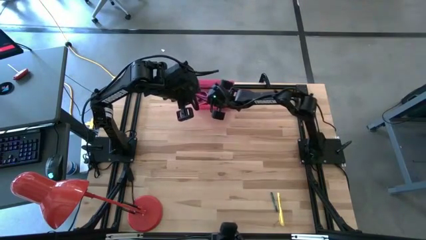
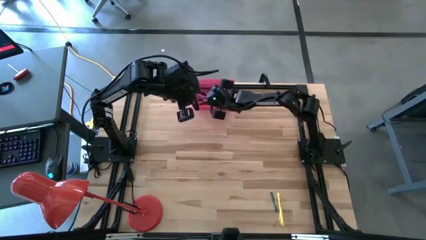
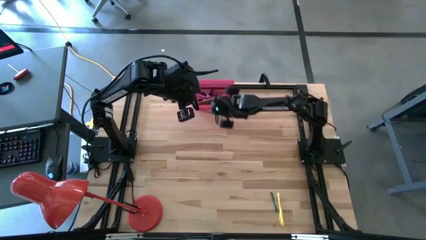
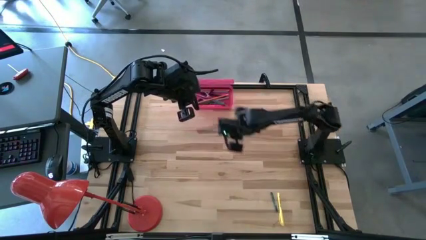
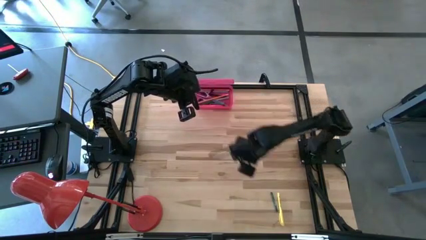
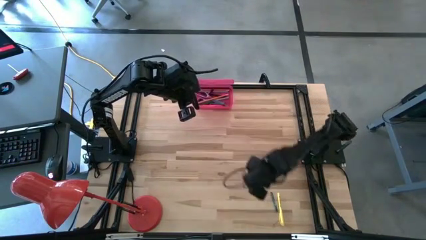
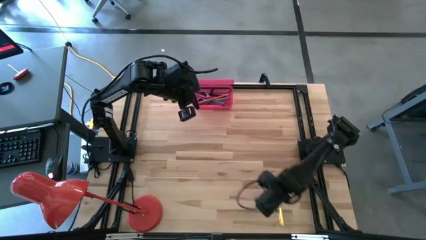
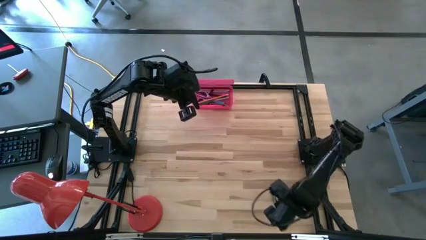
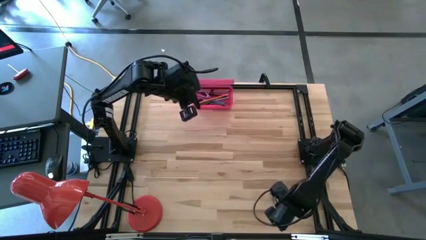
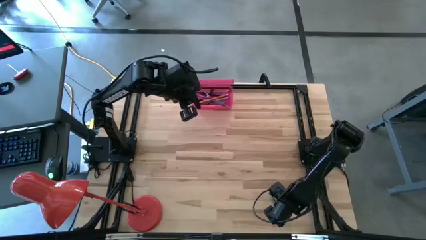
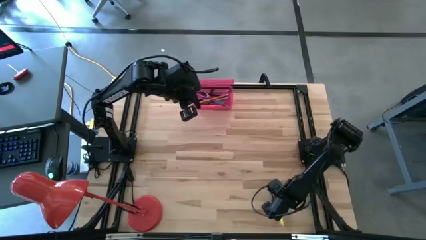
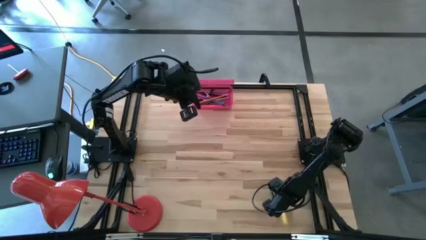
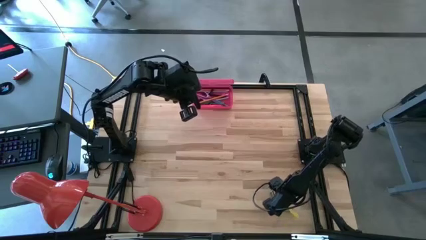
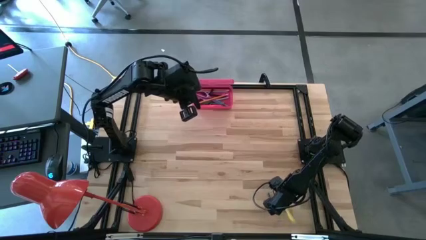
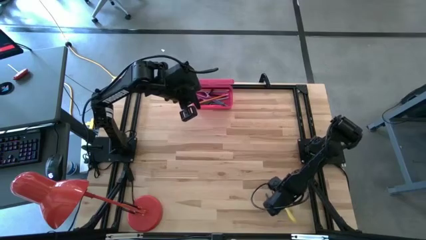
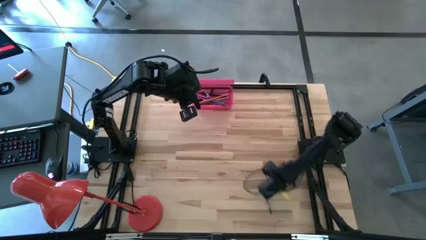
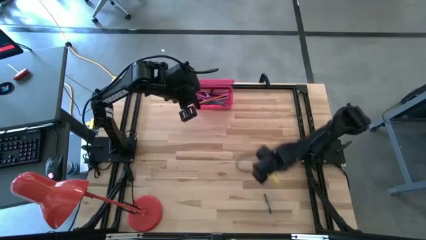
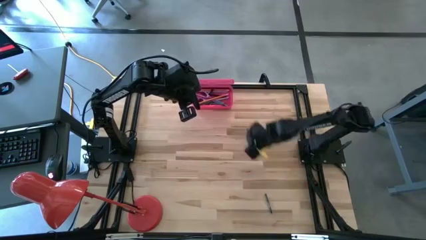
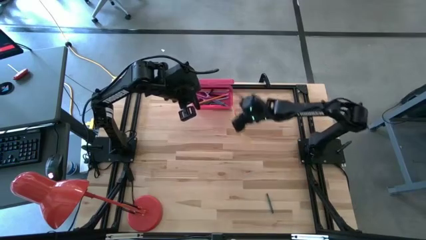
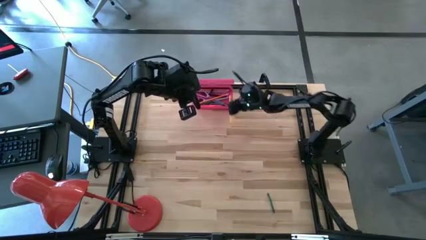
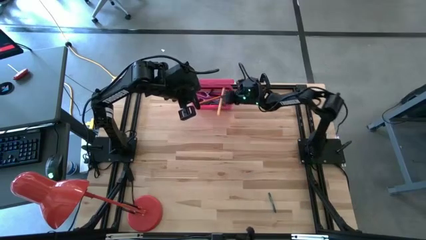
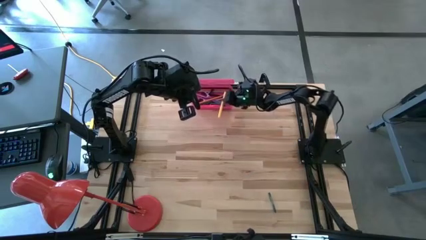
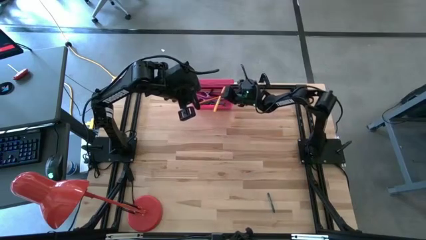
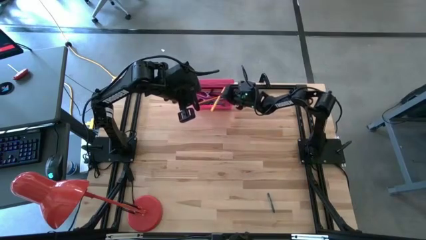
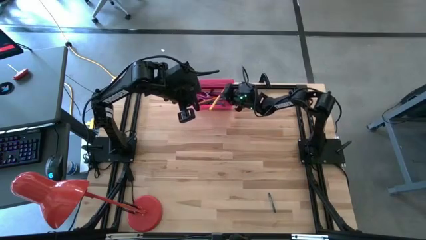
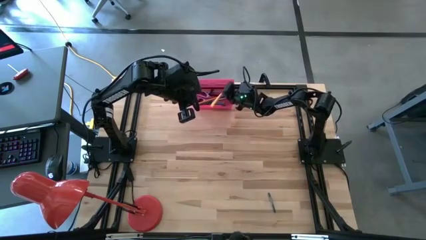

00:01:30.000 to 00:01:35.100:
Task: Pick & place school supplies into a supply box
Put the yellow pen into the pink supply box

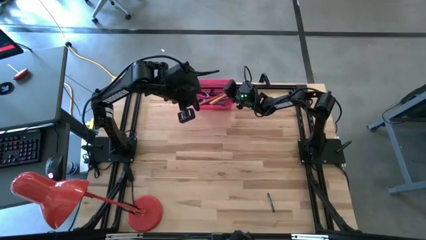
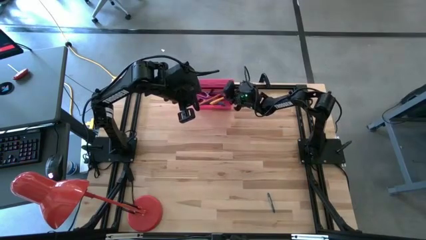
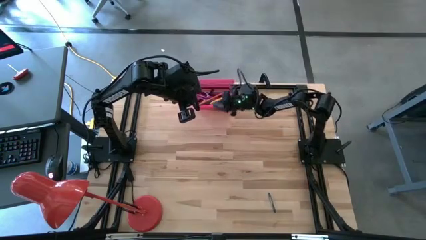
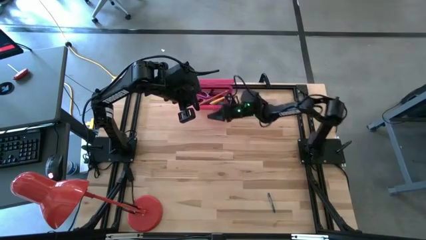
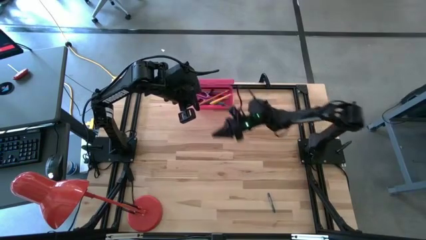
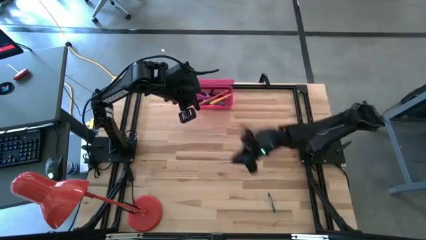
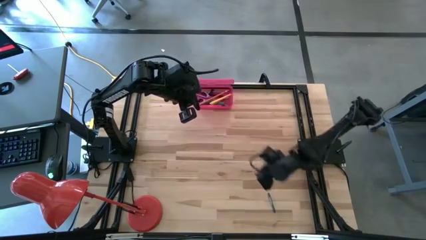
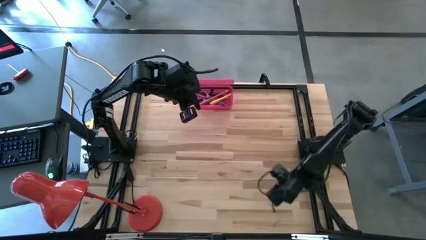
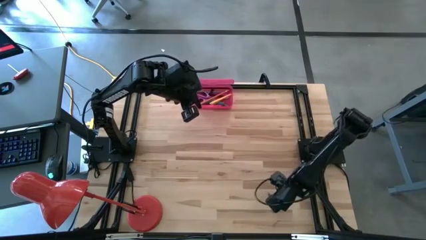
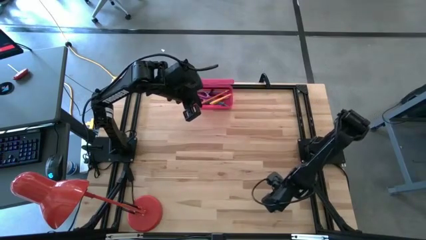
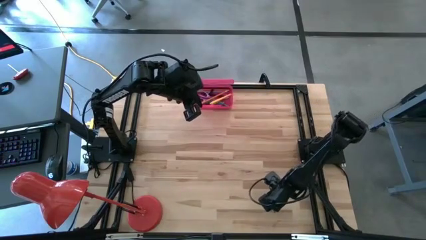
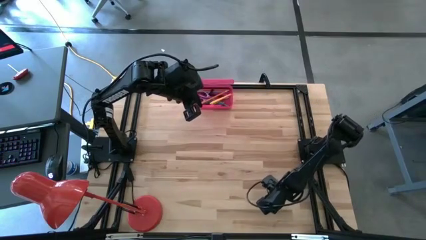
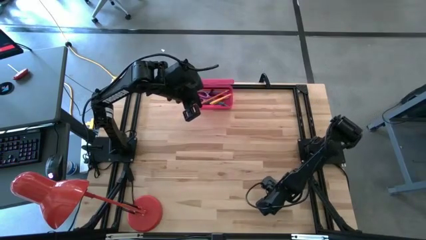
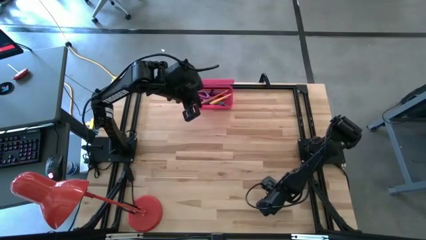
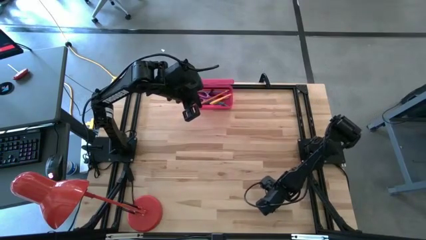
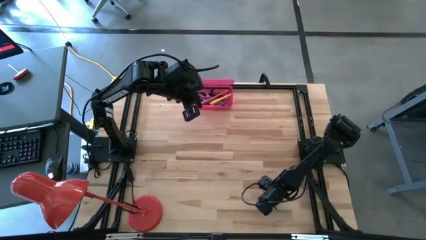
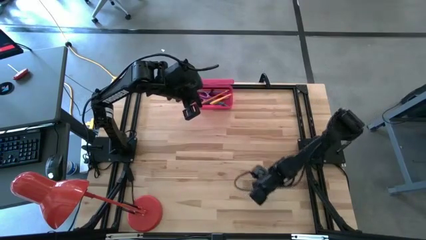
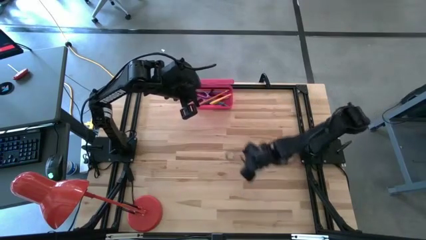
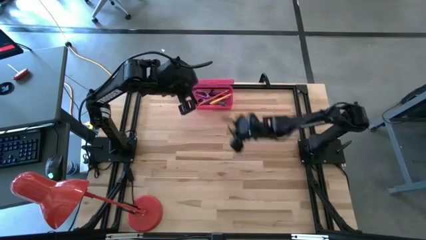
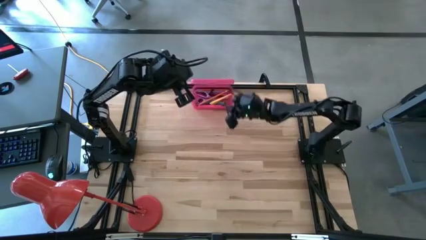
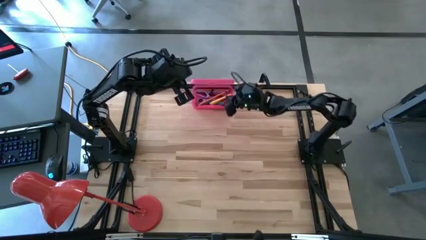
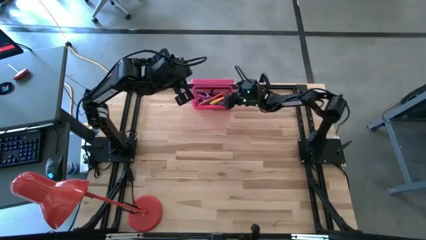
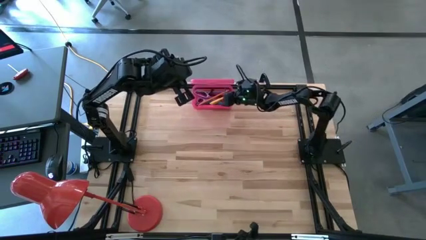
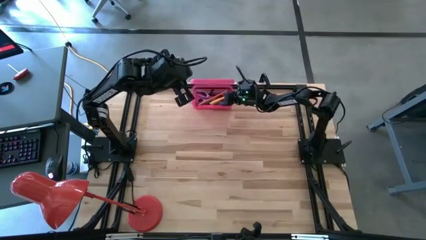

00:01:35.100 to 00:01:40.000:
Put the green crayon into the pink supply box

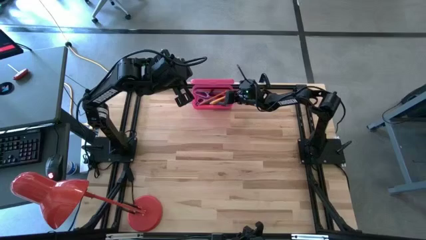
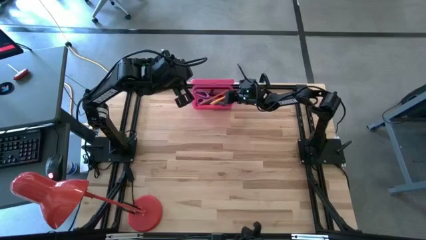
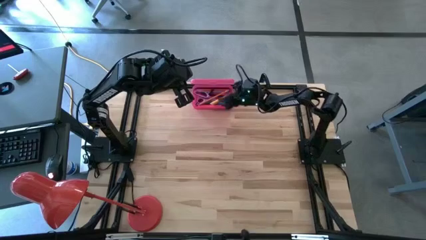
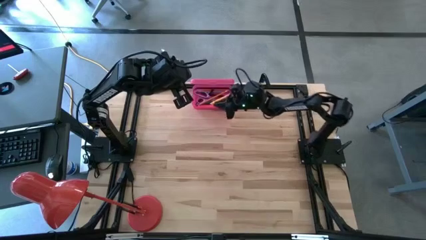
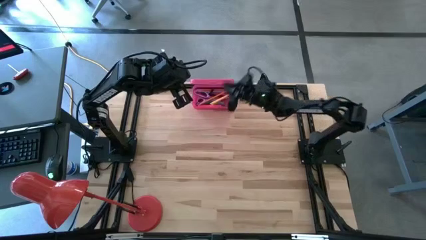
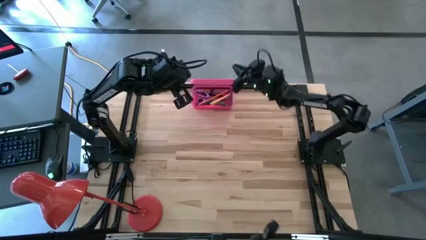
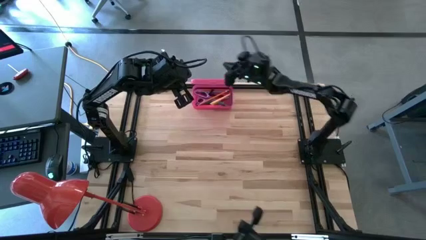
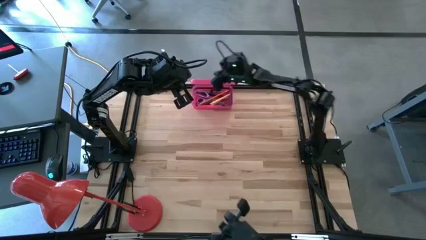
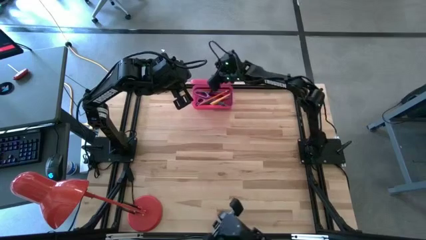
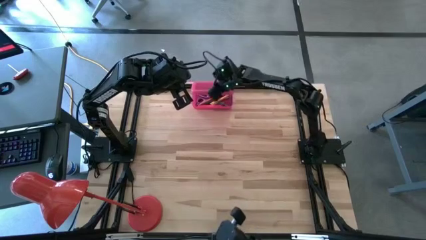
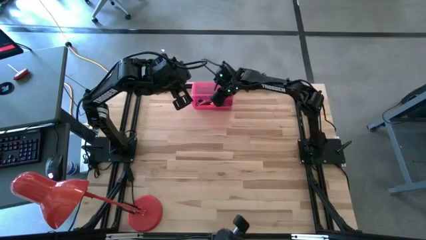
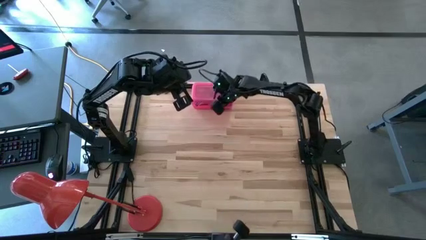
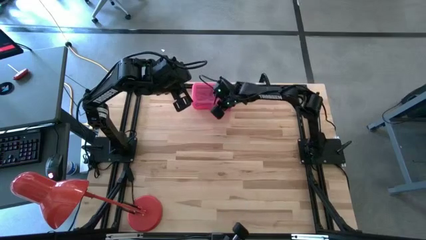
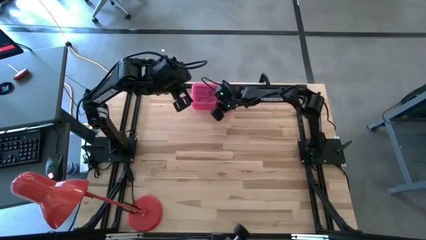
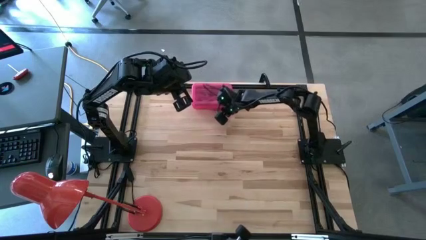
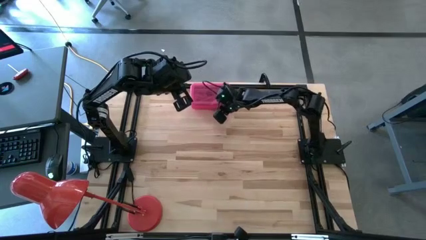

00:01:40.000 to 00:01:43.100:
Close the pink supply box

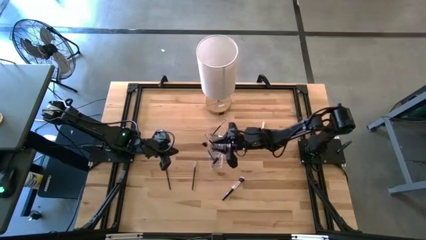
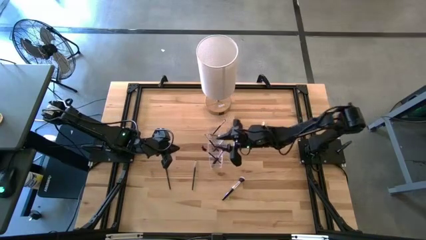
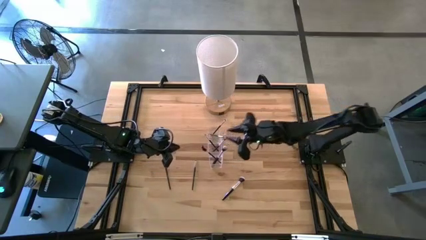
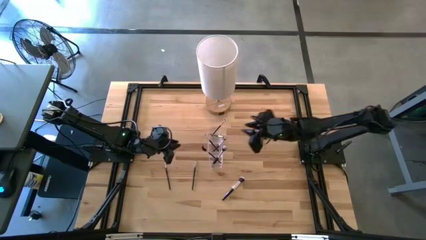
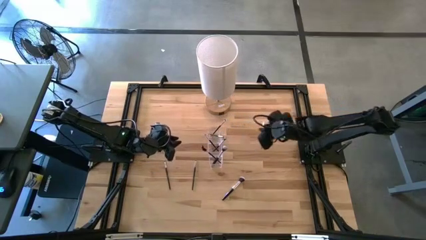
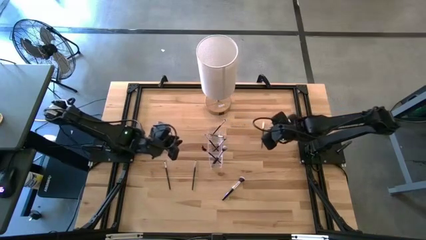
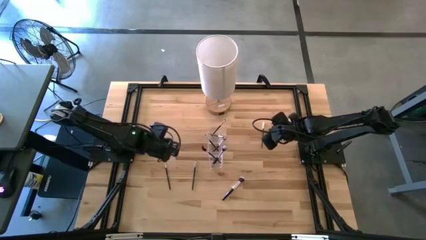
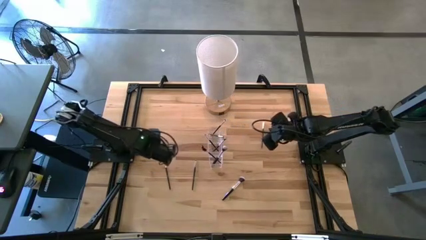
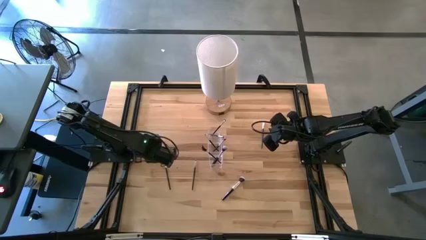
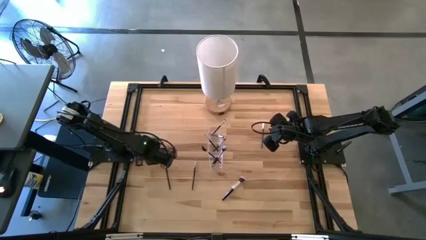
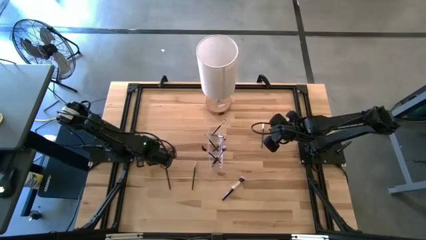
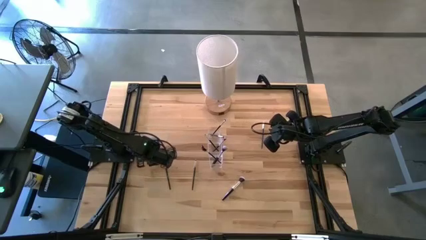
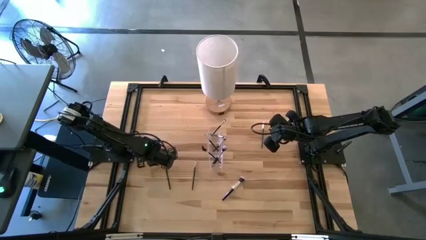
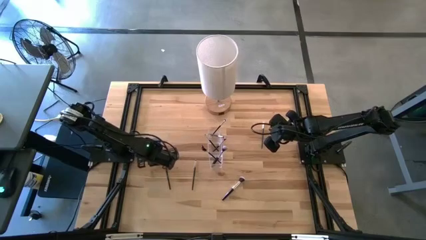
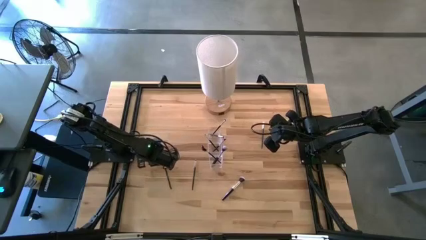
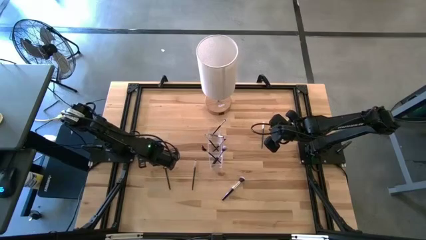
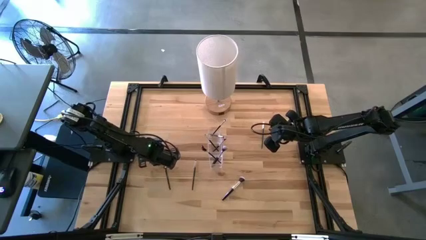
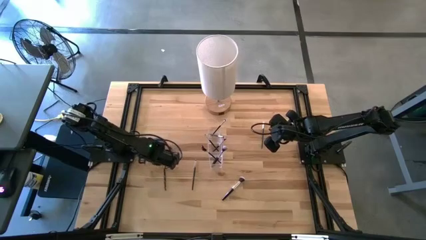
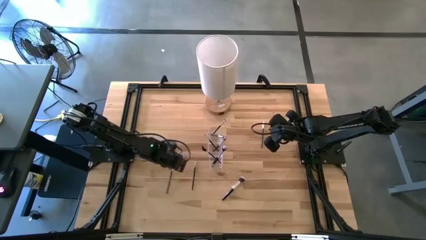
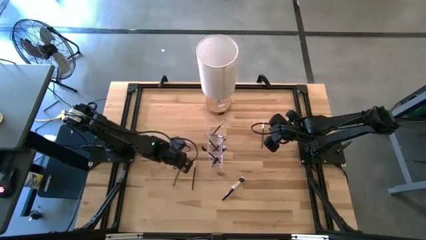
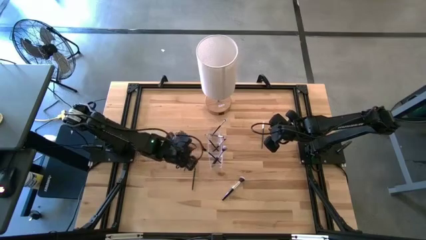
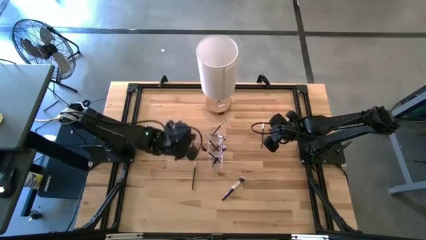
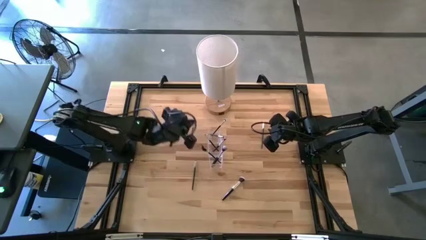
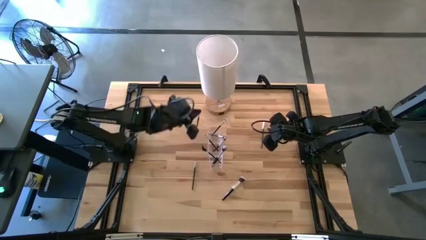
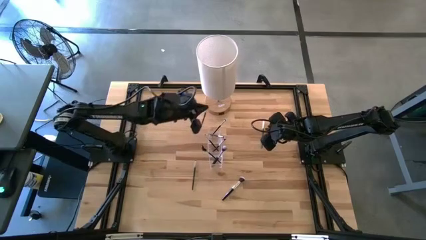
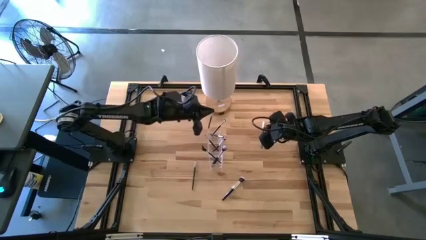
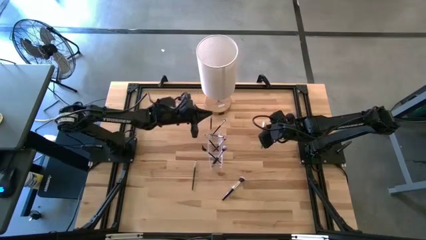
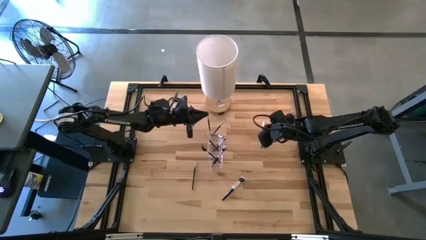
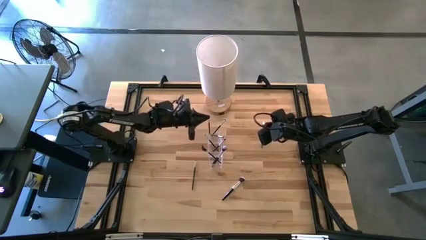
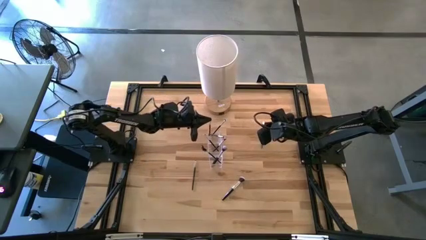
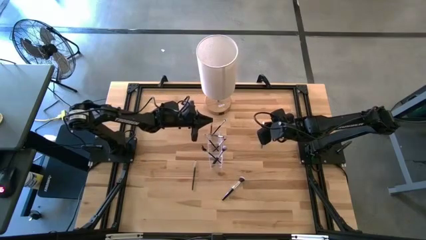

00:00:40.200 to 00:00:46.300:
Task: Put items in baskets/containers
Put the black eyeshadow brush into the transparent organizer
